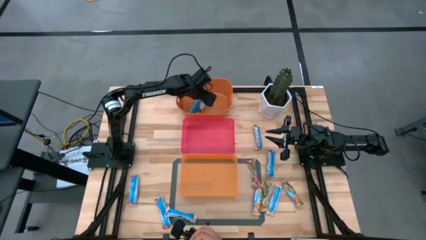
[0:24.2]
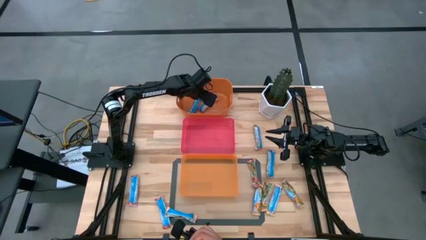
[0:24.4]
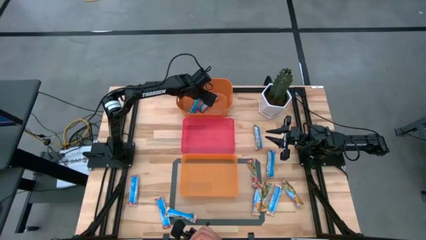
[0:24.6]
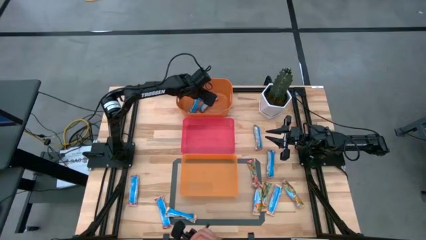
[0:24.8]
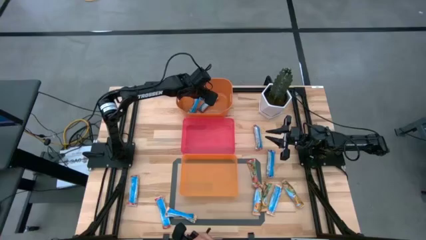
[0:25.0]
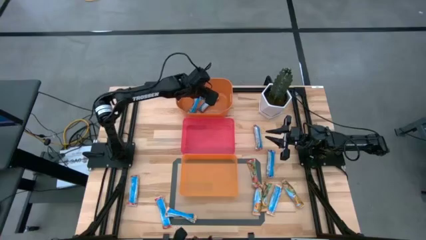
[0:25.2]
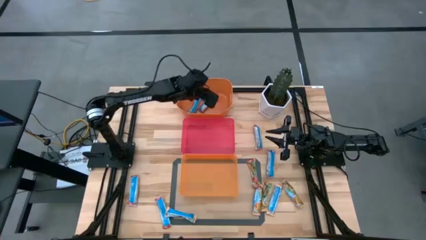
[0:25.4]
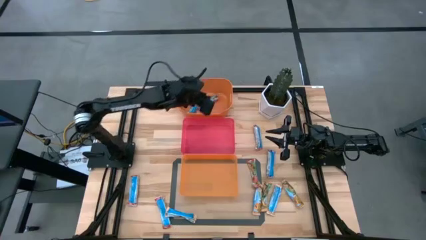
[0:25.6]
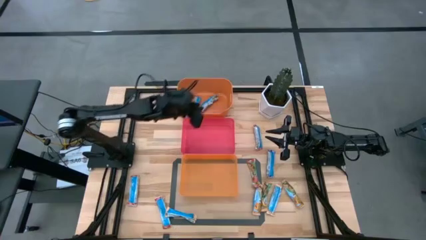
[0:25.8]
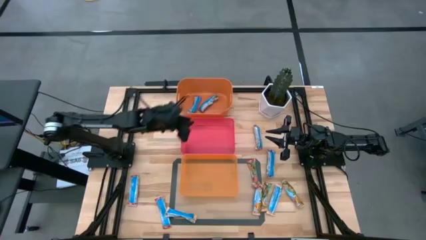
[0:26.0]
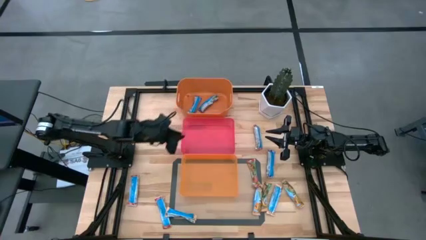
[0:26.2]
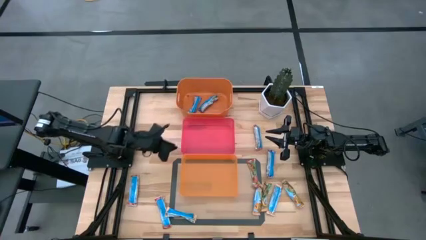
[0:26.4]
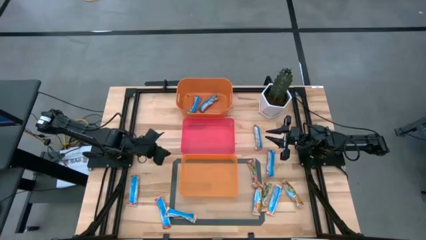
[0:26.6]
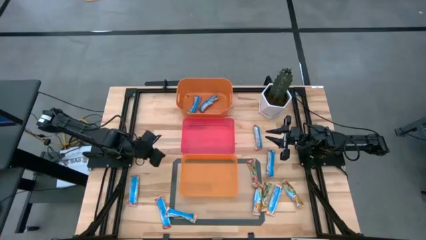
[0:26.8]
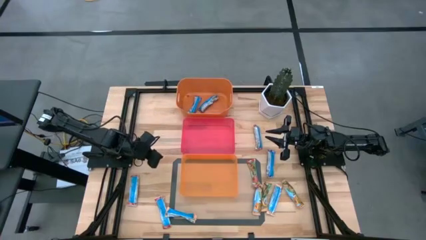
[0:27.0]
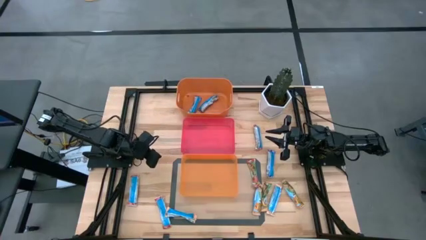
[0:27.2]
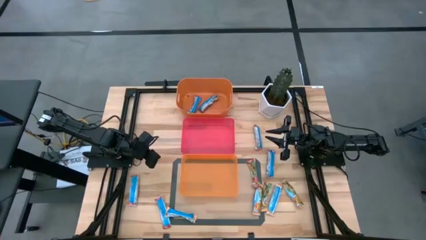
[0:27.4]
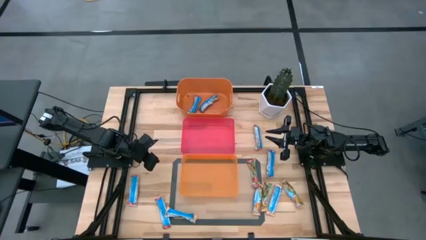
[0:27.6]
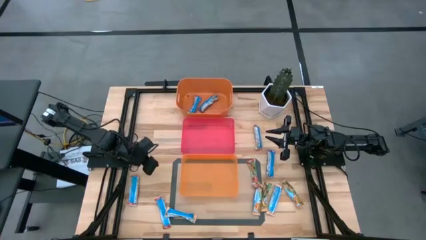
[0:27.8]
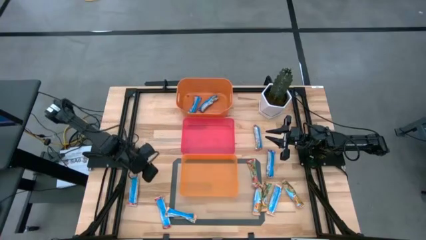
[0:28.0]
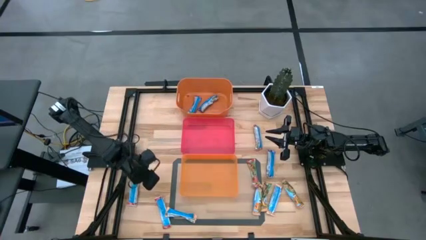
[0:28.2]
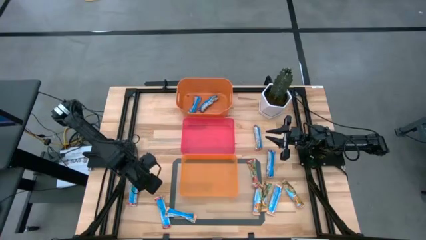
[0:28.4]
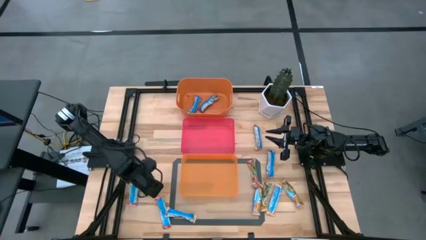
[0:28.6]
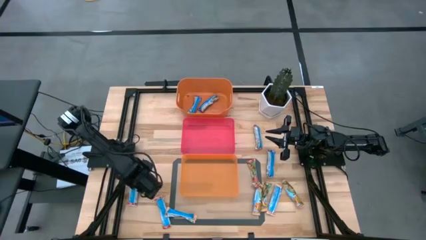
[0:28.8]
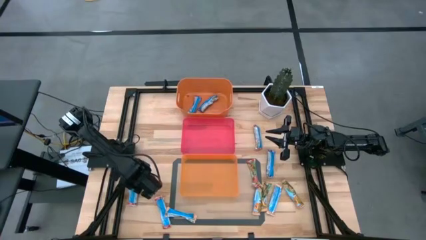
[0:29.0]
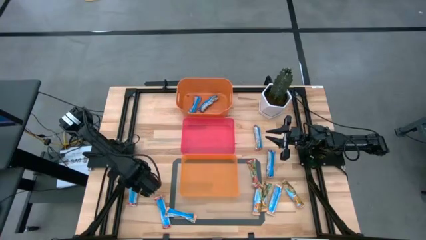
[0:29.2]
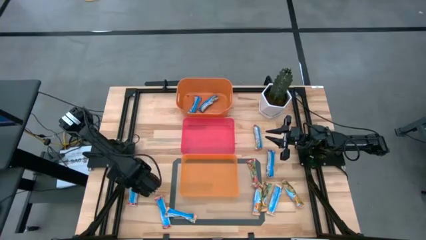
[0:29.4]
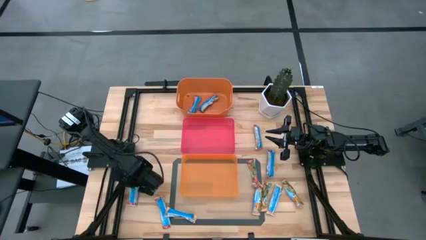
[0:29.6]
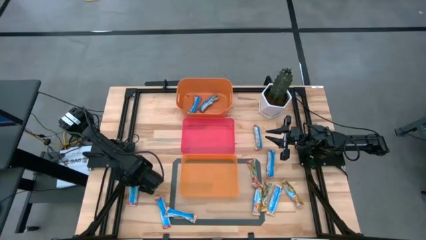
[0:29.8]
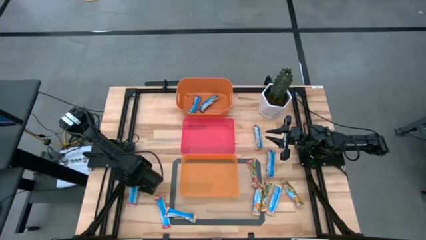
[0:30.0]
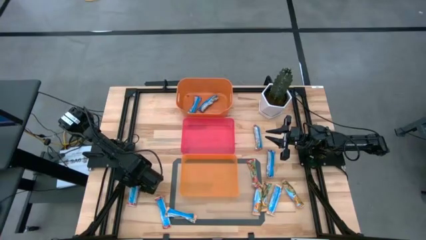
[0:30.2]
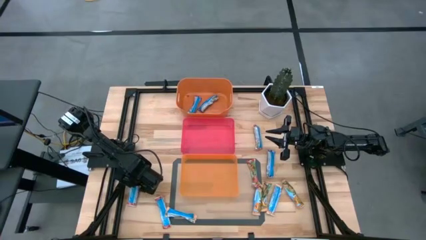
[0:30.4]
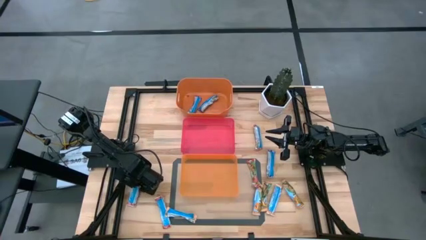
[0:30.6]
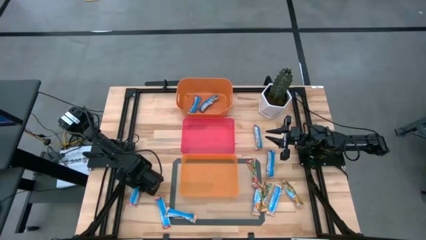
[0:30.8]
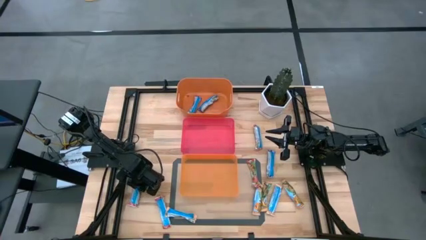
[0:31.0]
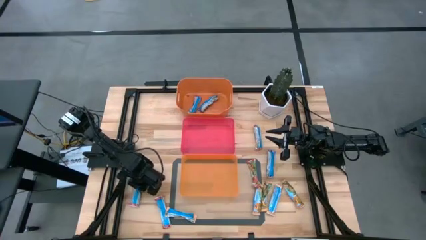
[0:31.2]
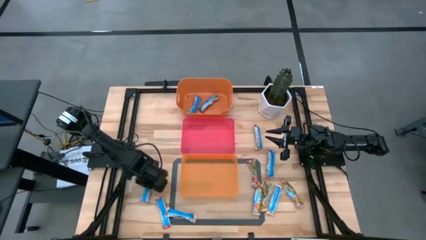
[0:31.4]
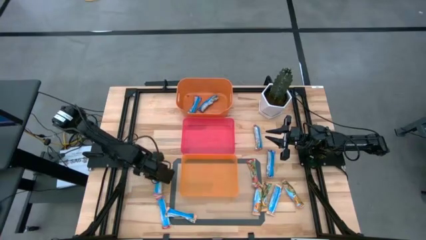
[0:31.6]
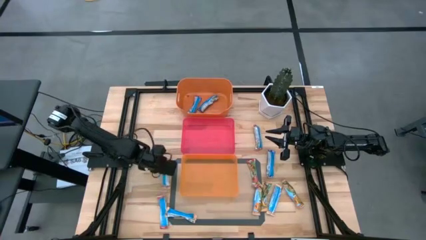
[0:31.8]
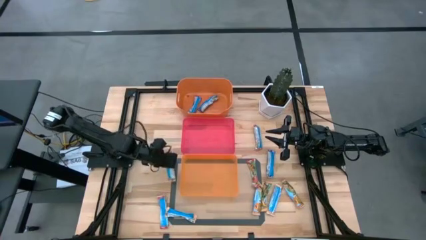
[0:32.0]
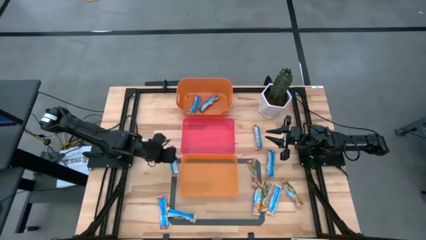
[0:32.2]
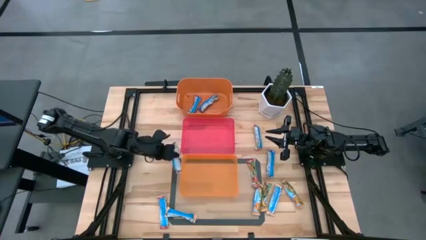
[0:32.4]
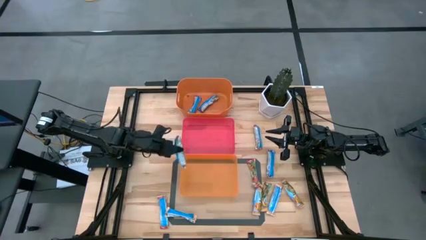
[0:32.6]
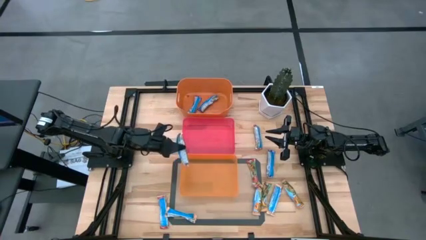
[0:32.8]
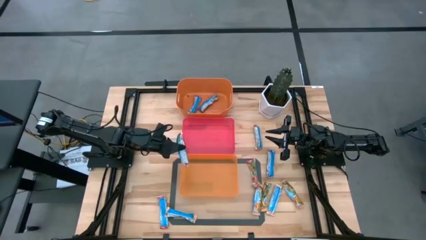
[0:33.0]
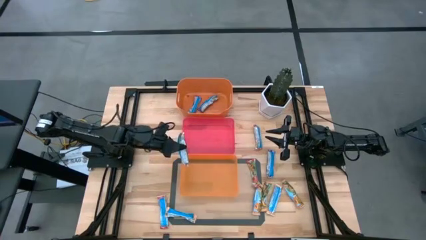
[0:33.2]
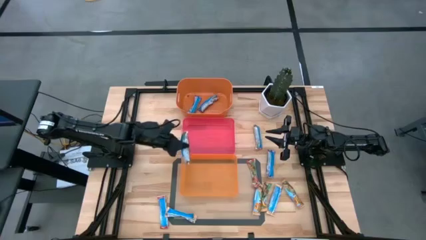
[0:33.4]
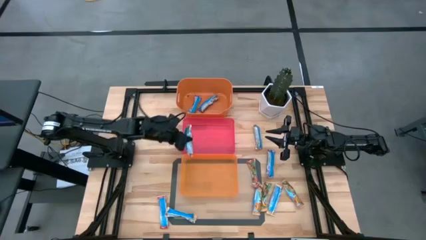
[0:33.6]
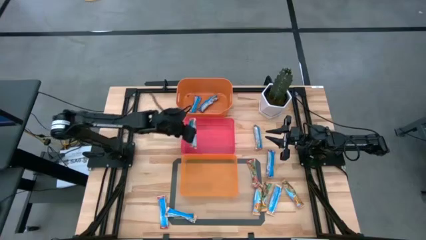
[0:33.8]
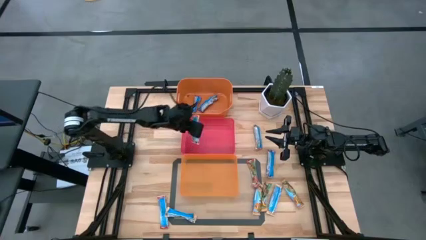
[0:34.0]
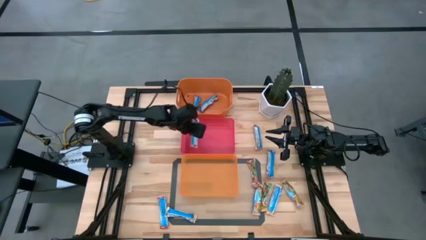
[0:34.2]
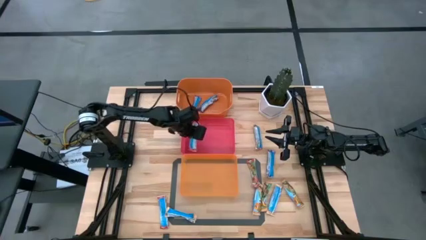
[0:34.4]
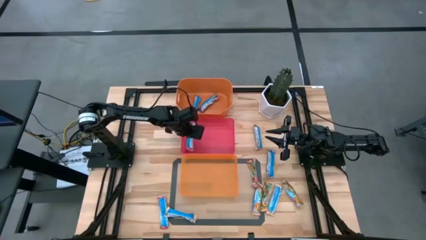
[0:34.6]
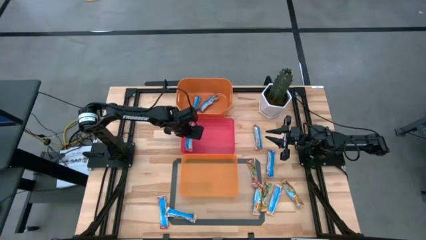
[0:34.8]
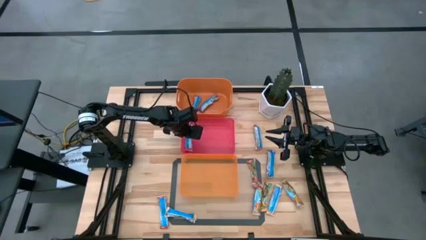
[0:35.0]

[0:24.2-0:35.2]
Task: Pick and place Granola Bars by type
Put the red granola bar into the red bin

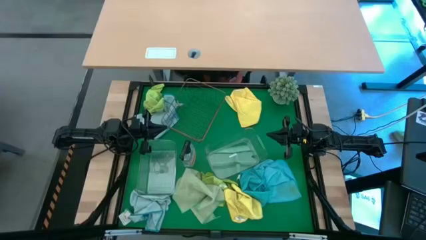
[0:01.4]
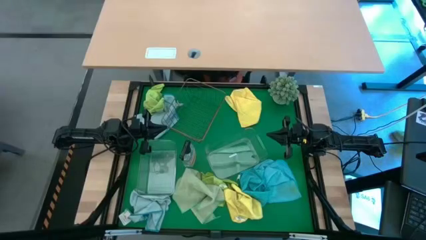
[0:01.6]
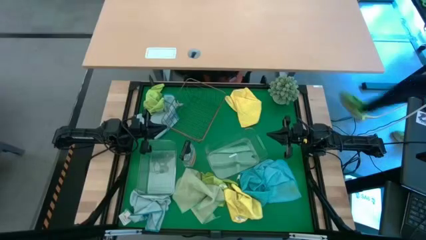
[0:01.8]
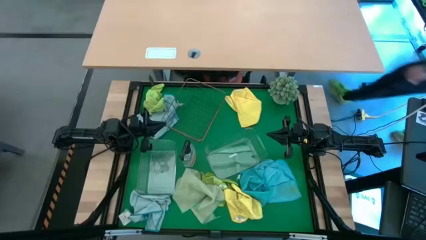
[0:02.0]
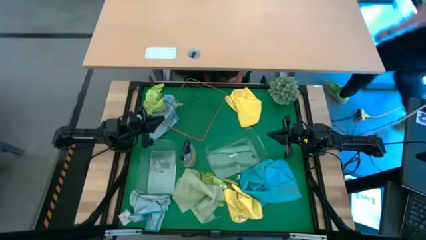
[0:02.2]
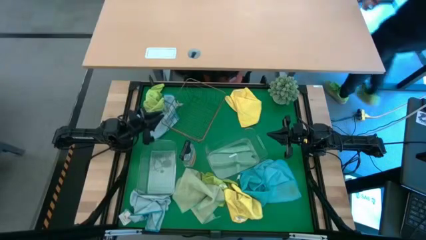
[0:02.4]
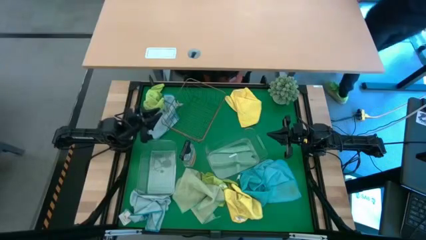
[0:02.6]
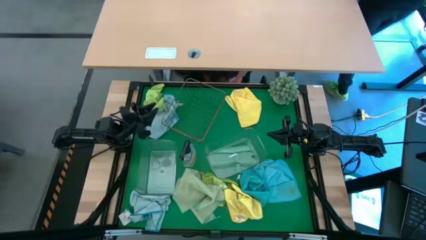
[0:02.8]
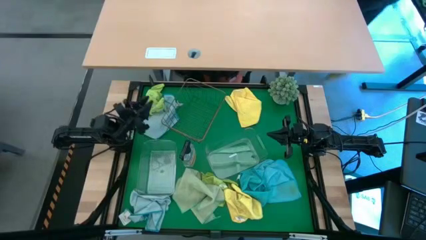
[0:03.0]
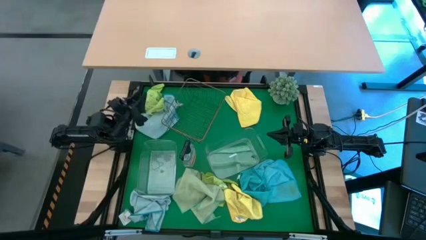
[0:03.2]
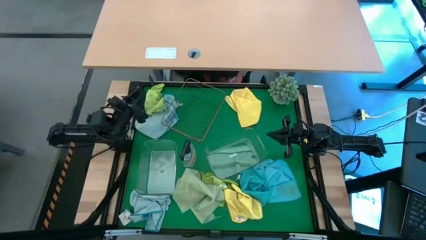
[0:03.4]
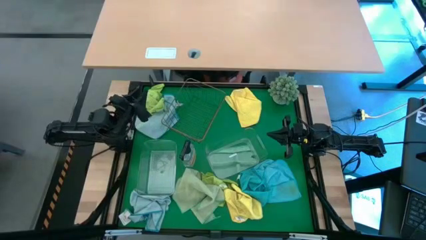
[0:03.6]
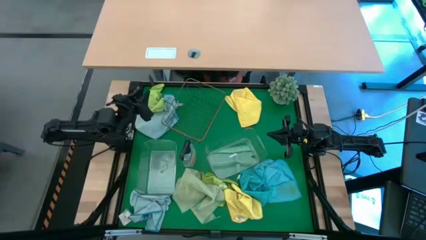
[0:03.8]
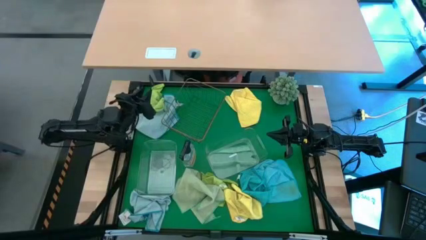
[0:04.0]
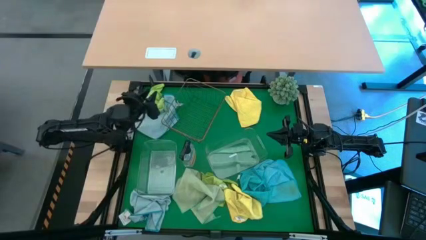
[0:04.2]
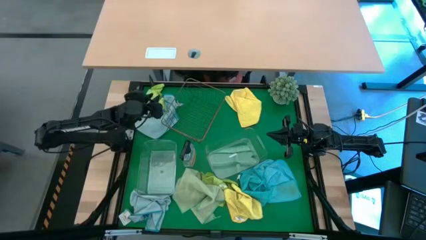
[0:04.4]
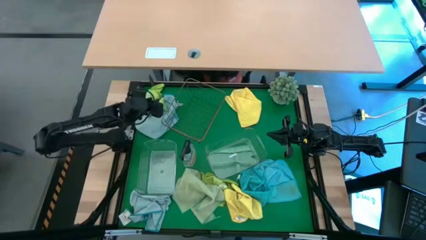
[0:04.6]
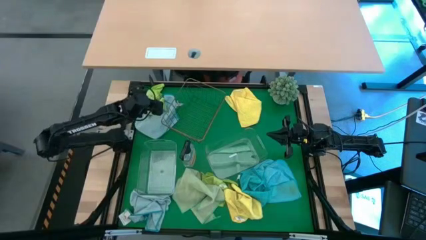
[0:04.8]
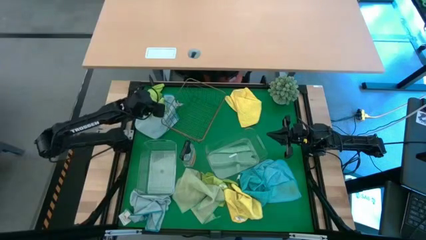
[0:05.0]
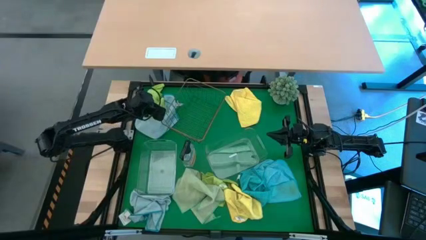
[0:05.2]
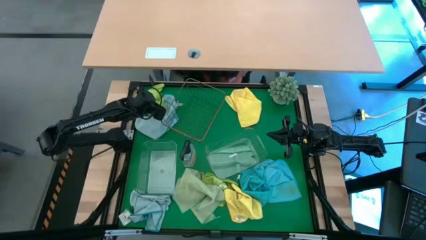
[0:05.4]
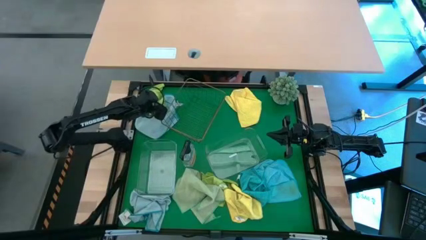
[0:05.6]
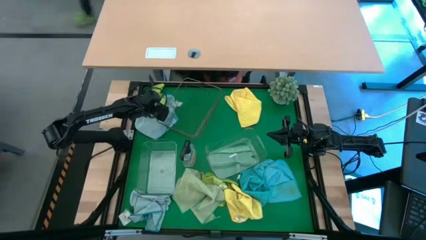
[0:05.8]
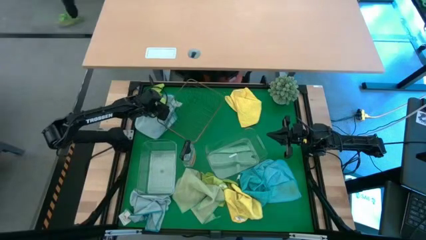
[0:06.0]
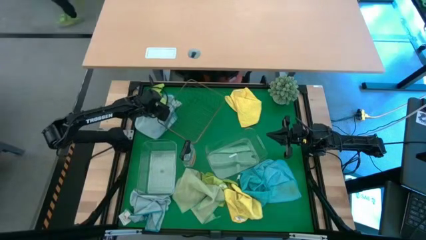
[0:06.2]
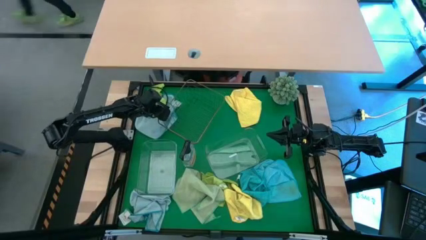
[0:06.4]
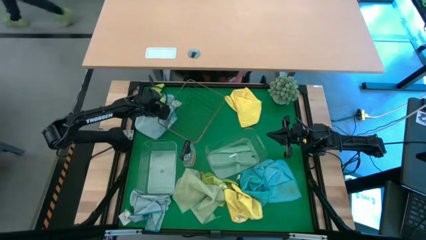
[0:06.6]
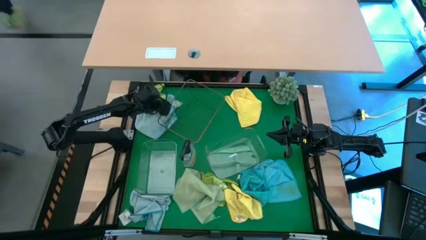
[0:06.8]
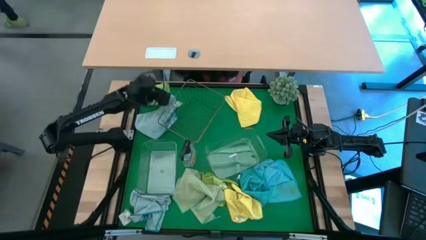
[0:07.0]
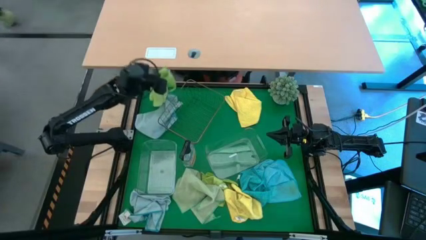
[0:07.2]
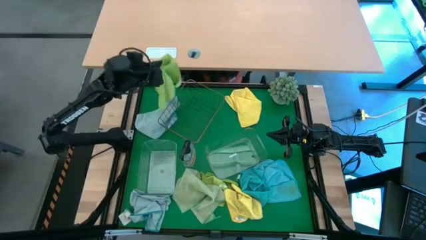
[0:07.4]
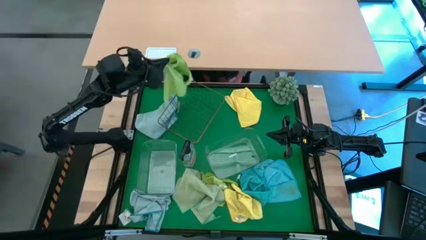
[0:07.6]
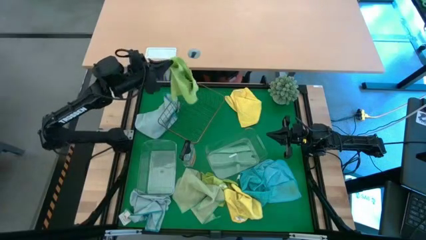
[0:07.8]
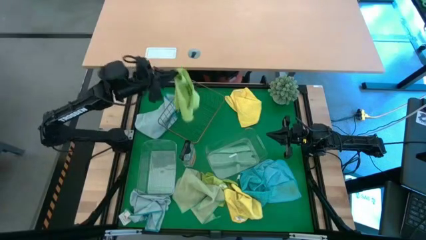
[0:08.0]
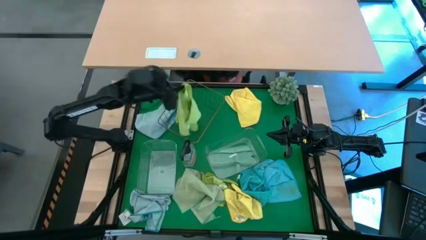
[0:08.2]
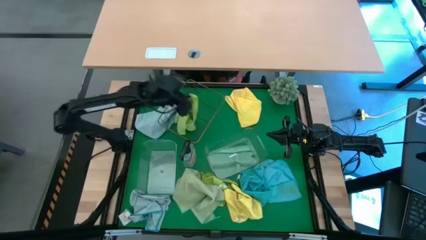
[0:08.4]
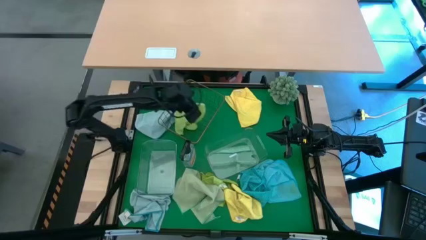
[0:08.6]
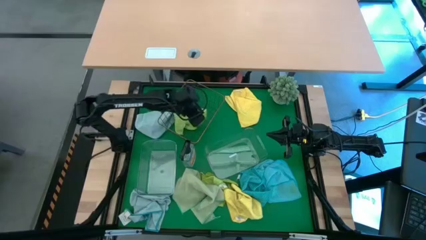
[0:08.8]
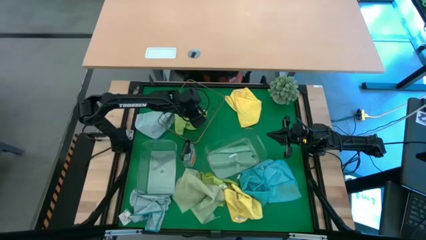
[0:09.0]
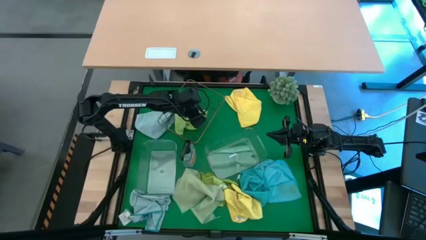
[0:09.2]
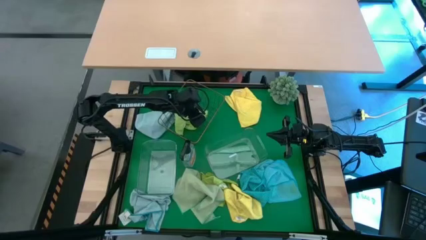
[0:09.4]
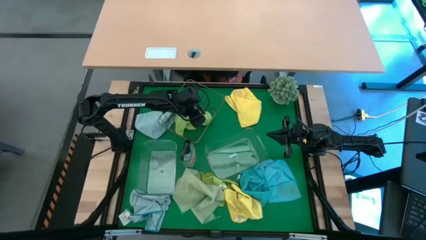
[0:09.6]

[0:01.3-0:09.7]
Task: Sort microfiber towel by color & place in baskets
Put the top dark green towel into the wire basket
